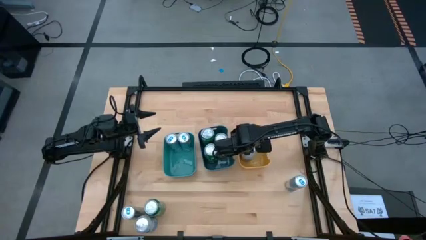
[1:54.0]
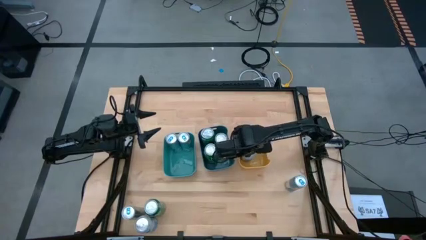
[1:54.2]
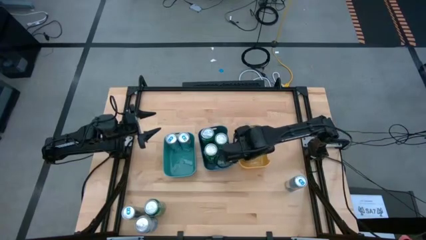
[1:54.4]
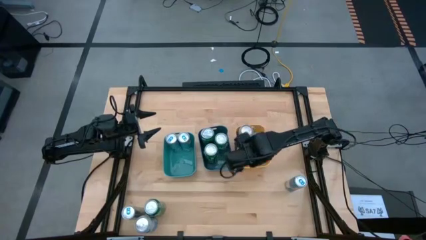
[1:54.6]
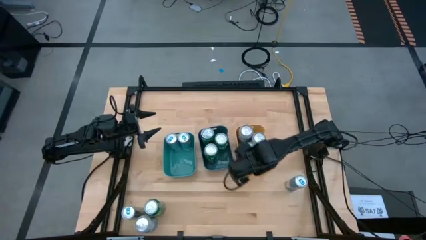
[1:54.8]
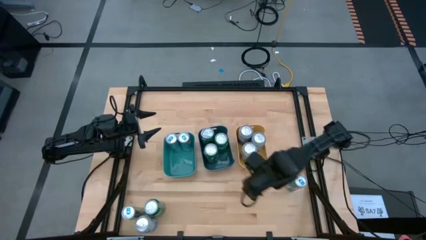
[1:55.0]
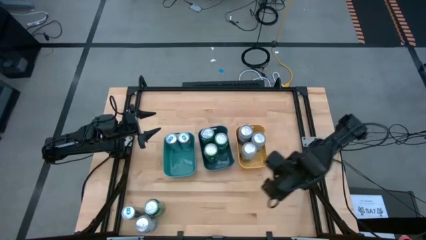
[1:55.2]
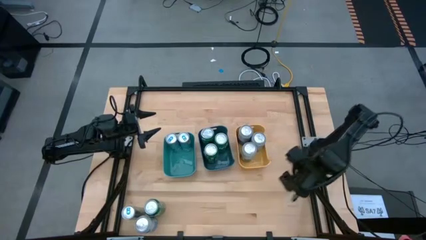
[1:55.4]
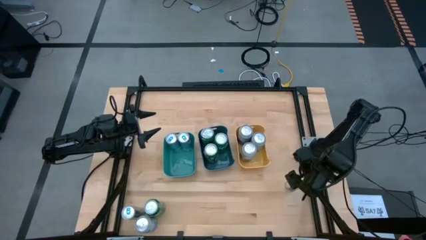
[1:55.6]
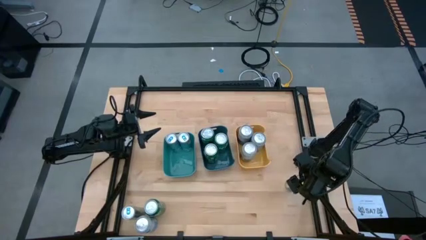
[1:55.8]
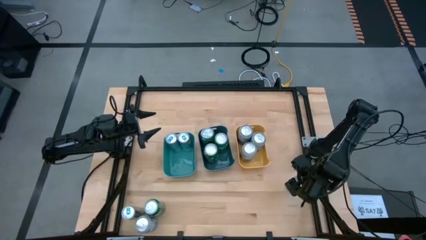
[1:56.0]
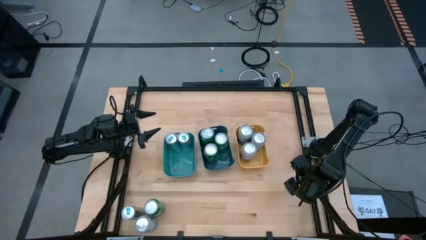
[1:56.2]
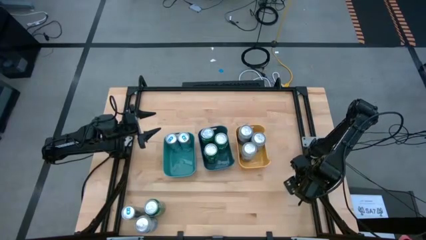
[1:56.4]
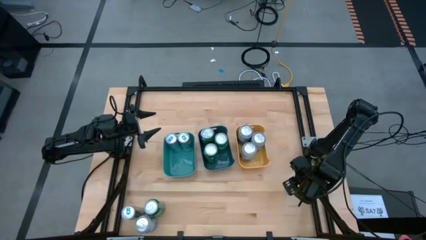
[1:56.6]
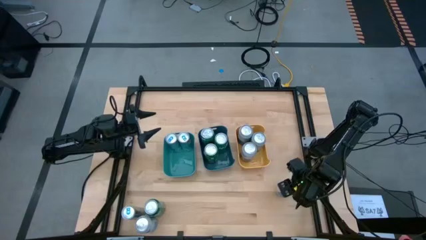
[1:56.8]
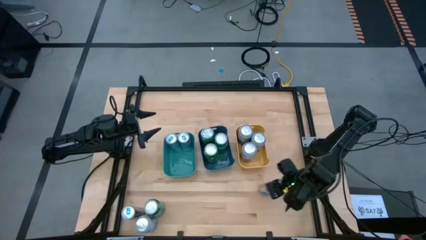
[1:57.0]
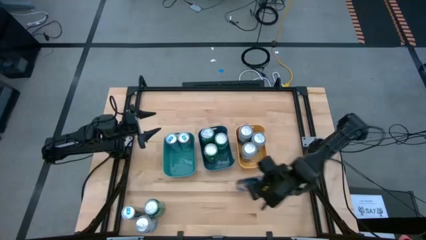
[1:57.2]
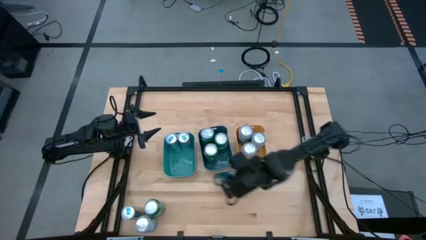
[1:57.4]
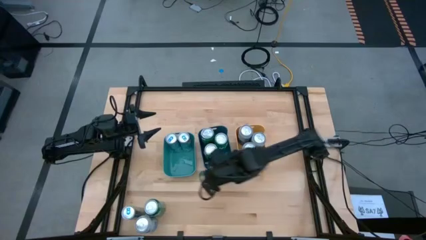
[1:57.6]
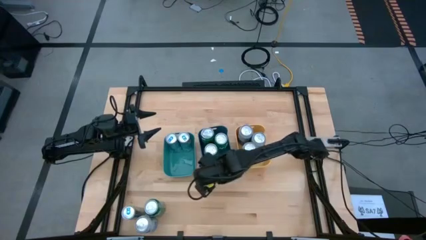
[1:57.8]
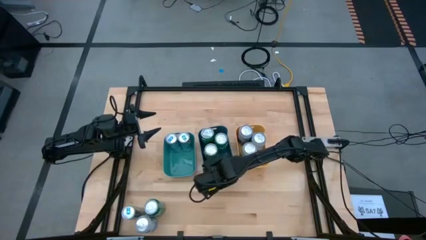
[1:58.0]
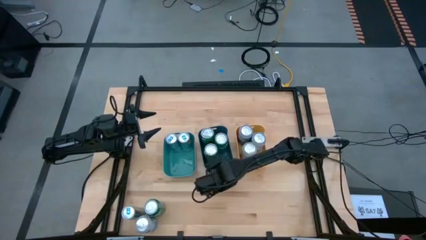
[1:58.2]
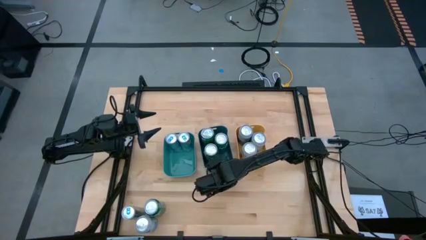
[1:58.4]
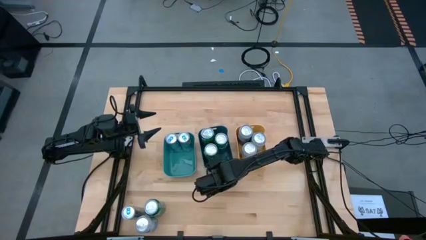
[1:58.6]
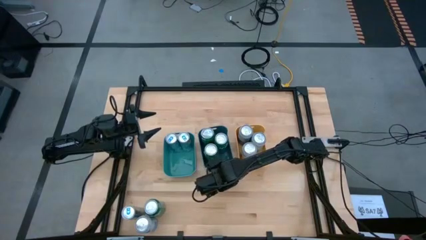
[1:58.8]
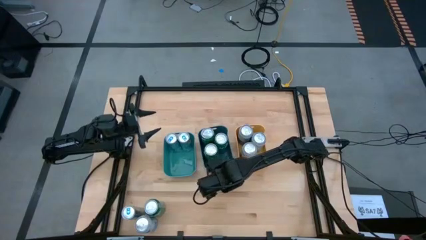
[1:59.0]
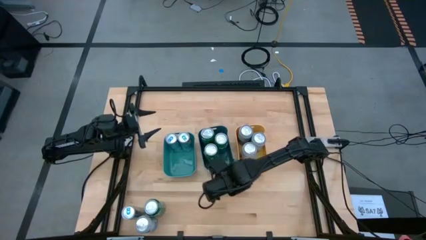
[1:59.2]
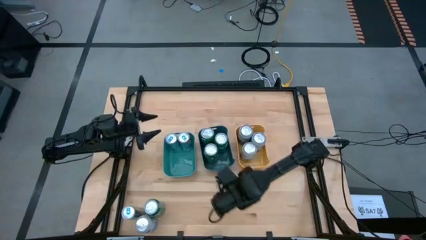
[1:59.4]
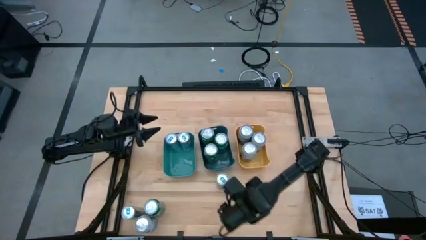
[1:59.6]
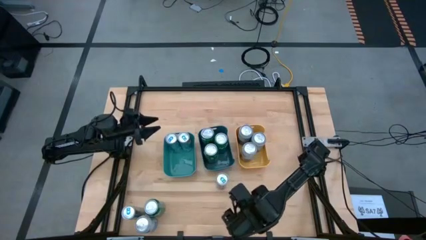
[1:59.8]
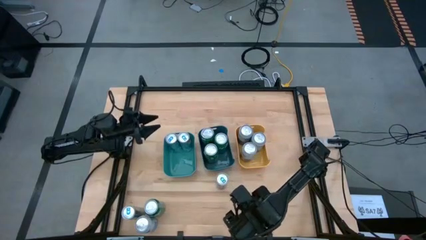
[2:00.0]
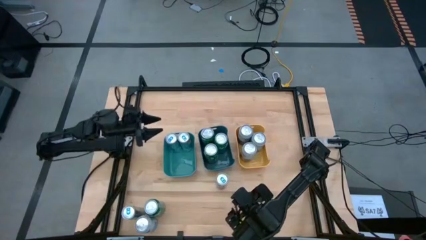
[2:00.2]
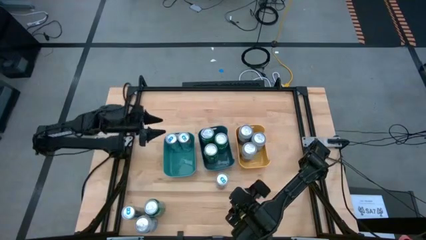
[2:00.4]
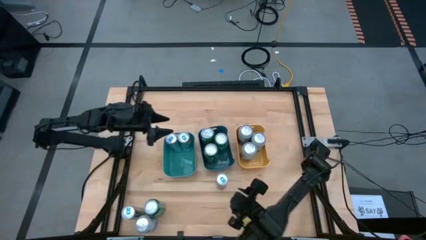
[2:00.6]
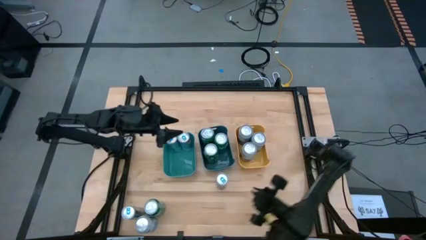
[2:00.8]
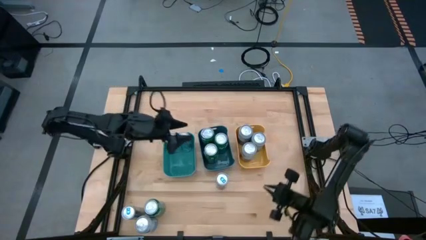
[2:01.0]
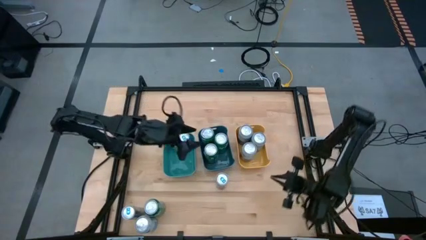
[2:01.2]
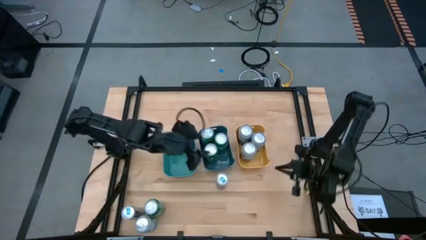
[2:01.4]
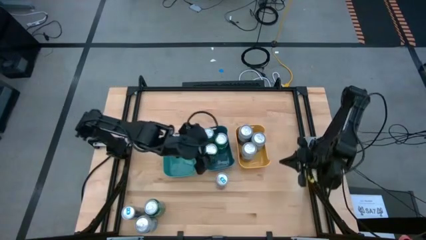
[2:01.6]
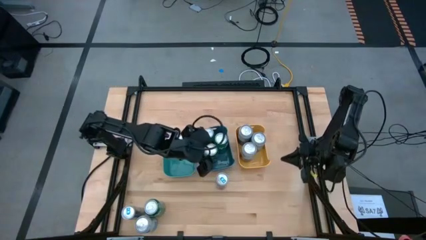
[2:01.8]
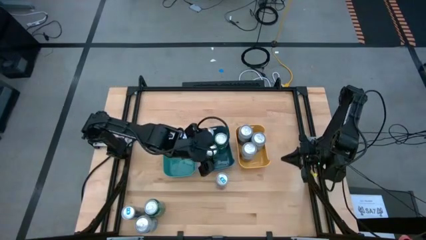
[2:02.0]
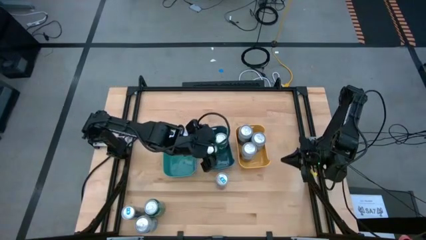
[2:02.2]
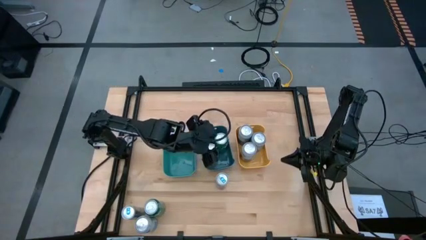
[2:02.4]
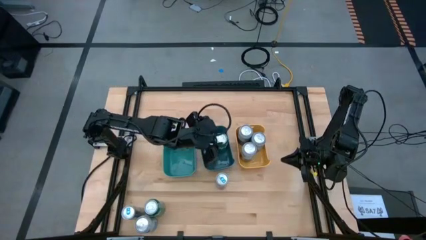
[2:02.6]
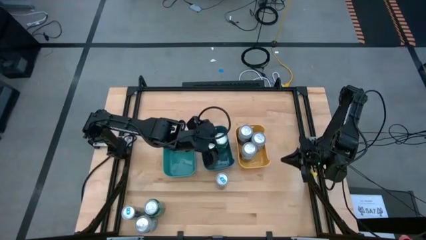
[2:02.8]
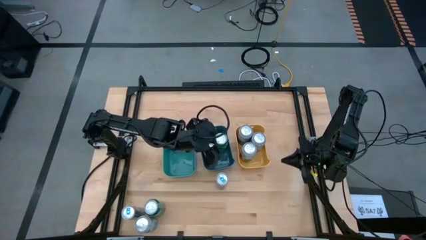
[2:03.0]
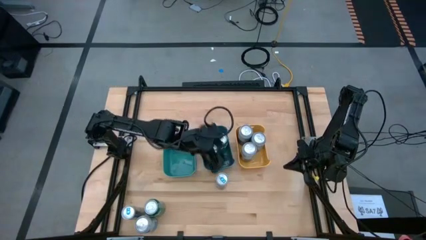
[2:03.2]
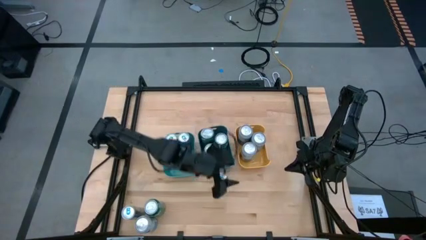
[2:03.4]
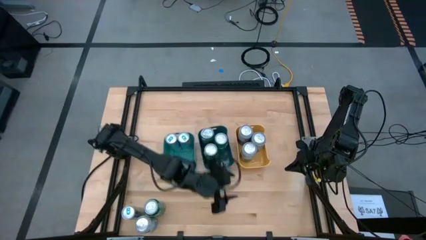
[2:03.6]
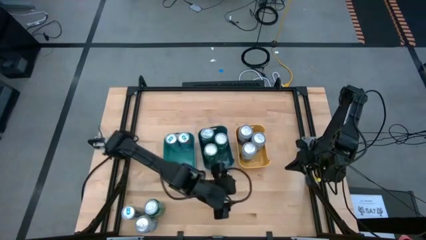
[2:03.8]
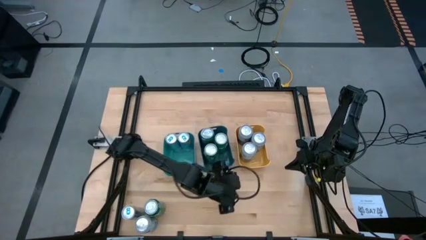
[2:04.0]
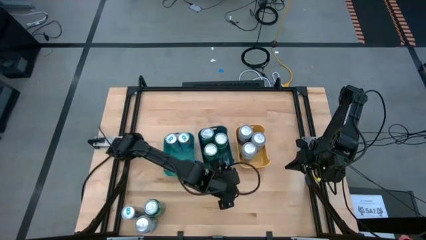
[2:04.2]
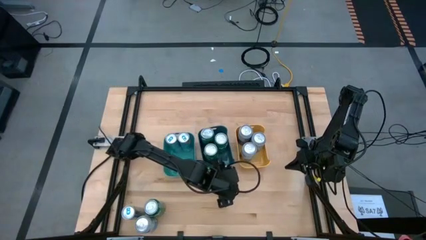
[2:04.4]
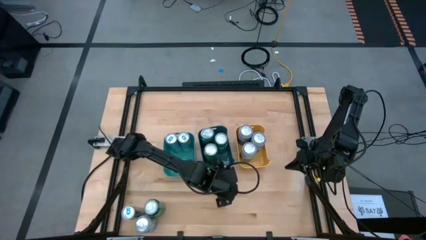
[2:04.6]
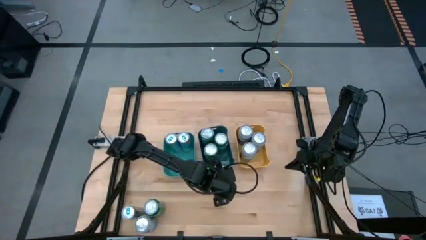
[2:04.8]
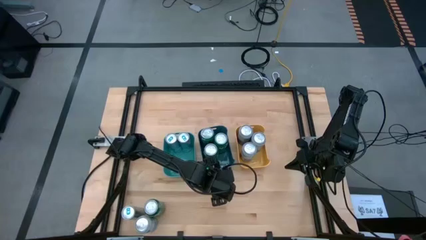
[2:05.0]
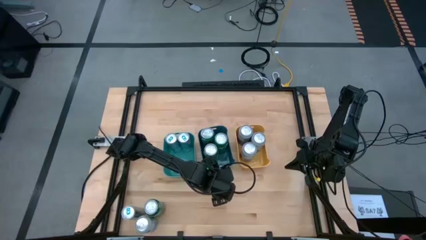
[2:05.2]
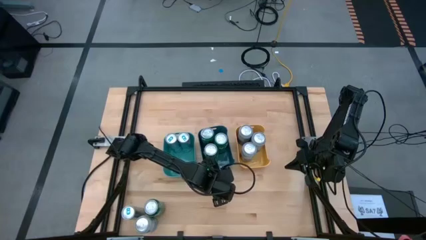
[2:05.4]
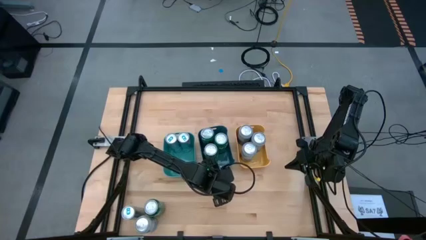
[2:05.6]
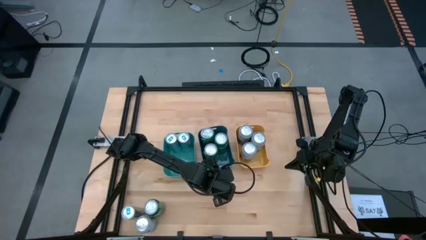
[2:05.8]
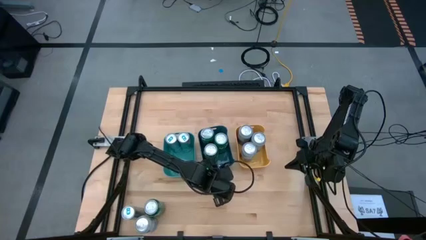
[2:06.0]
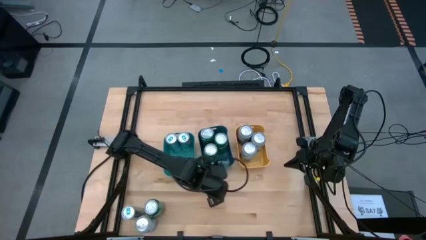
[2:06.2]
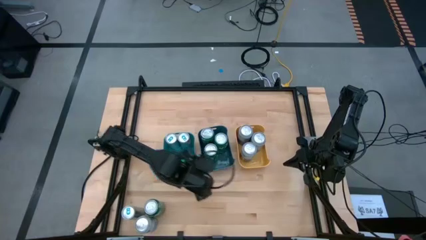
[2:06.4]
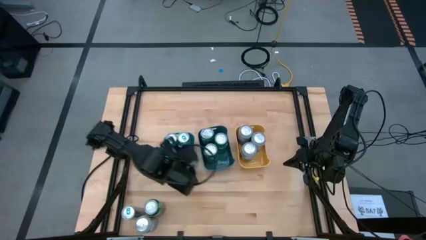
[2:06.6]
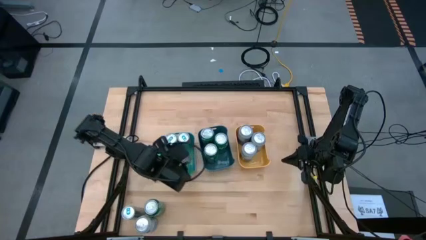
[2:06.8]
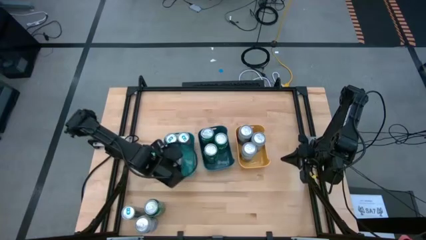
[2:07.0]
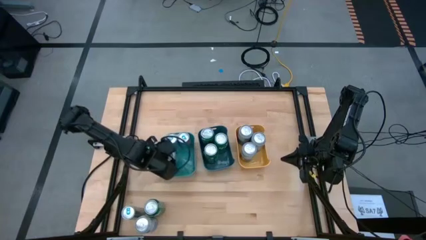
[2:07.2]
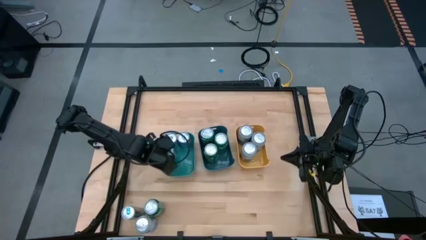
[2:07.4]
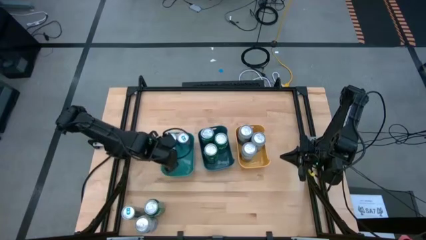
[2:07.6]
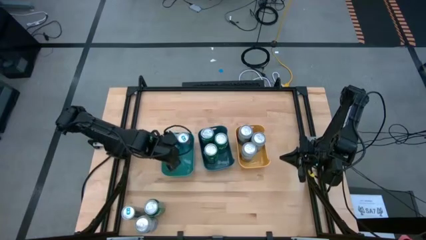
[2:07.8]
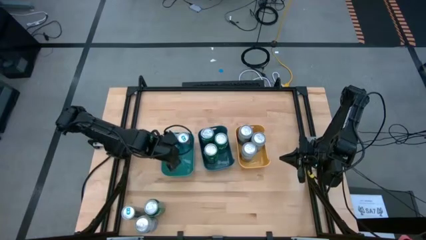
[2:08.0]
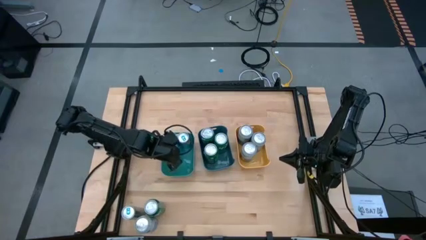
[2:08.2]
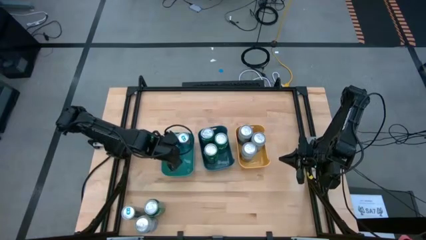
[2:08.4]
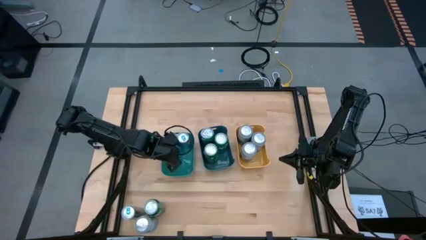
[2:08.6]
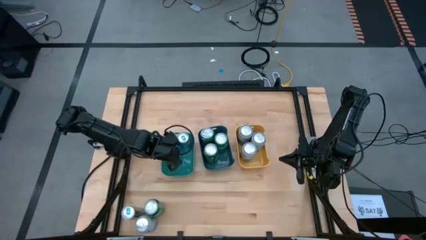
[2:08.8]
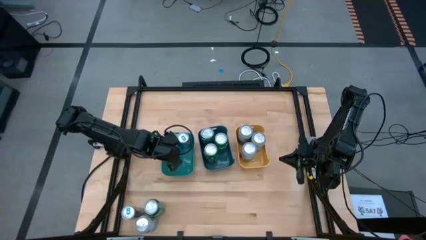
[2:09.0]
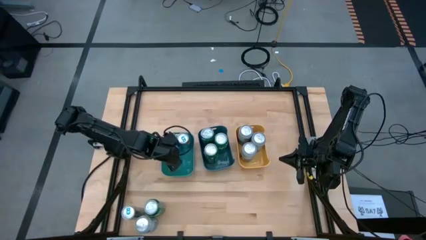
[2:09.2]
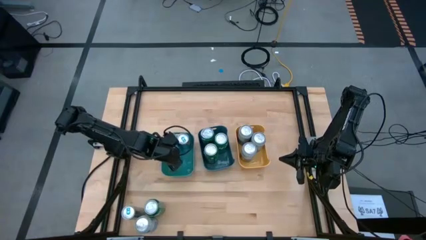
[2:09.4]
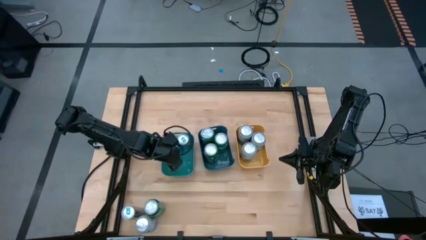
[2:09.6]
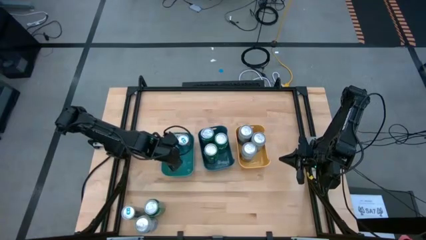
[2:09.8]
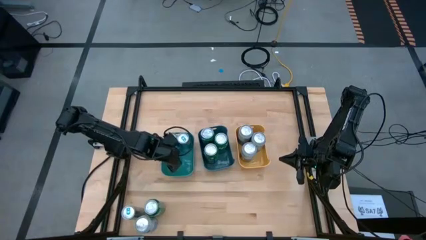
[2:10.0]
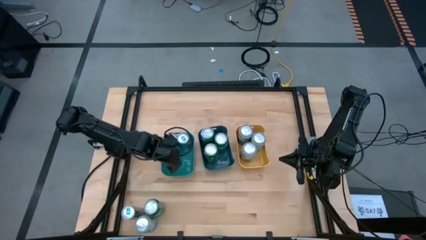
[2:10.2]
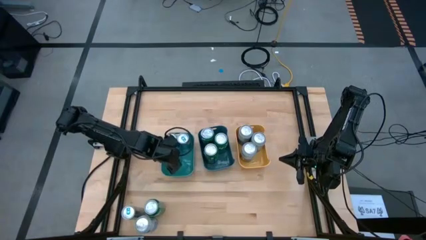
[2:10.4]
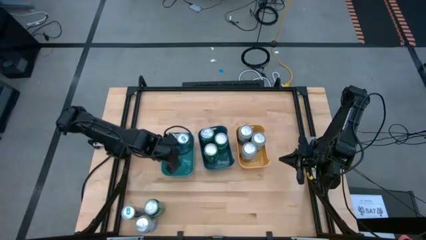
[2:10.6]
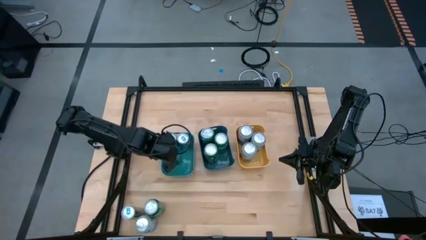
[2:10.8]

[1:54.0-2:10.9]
Task: Sort soda cans
Put the right white/blue soda can into the green bin
